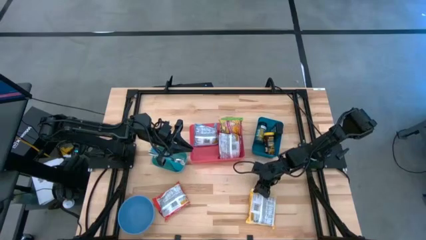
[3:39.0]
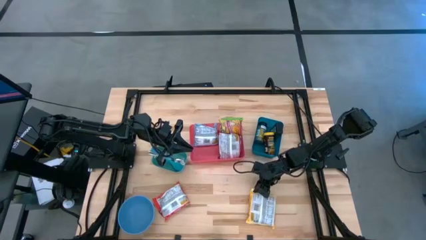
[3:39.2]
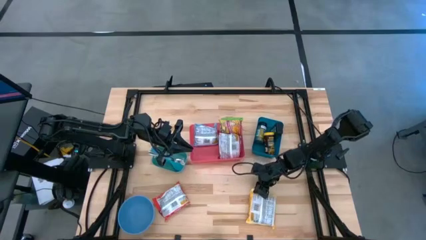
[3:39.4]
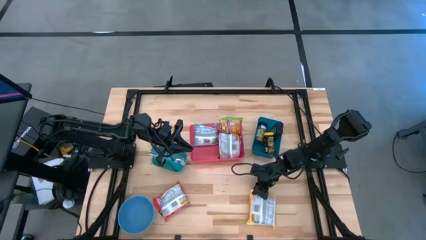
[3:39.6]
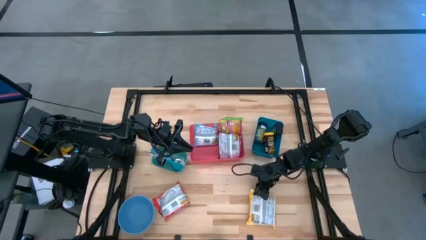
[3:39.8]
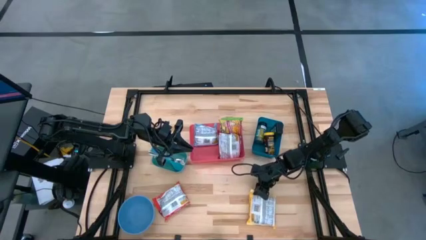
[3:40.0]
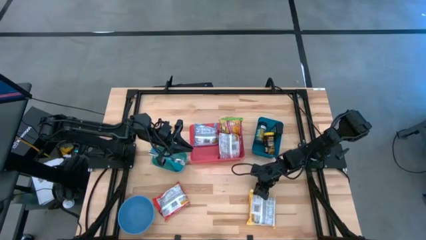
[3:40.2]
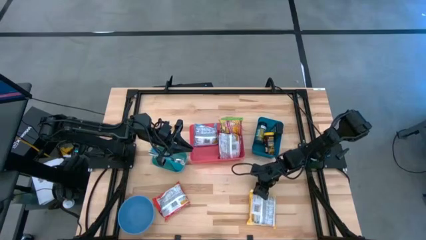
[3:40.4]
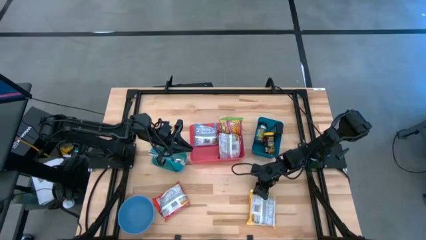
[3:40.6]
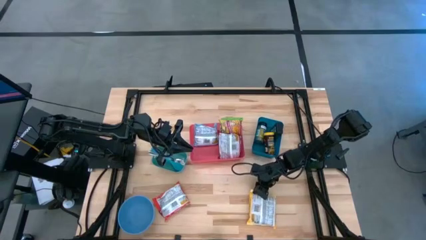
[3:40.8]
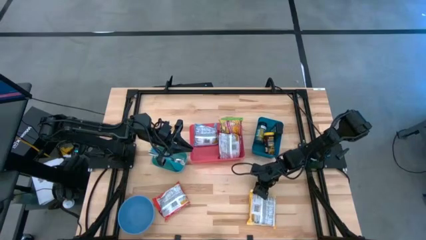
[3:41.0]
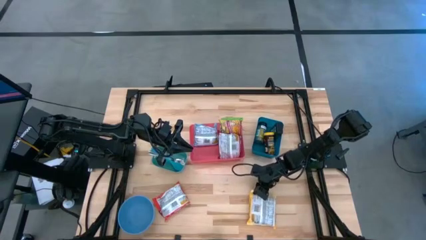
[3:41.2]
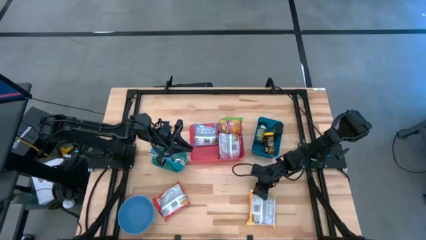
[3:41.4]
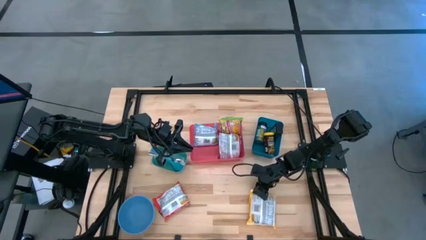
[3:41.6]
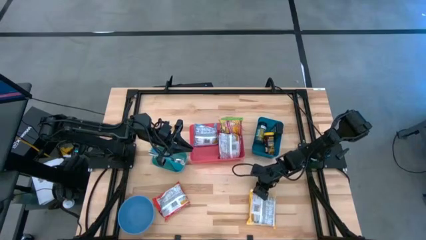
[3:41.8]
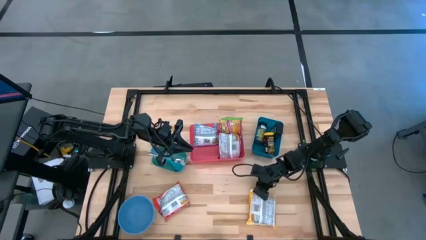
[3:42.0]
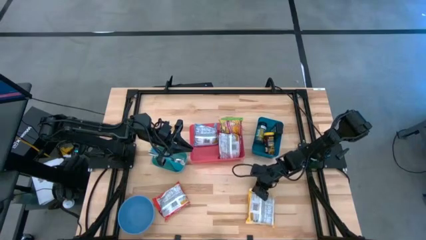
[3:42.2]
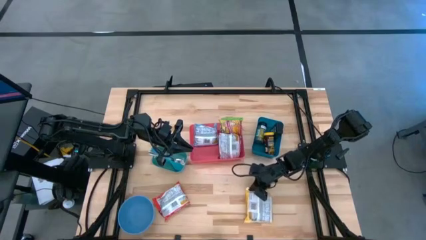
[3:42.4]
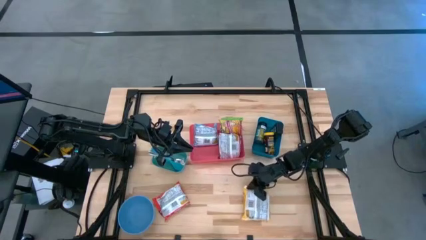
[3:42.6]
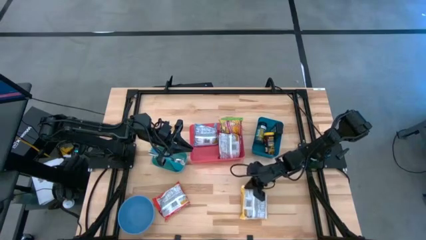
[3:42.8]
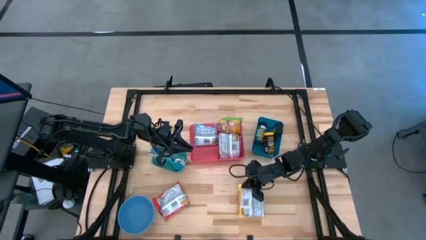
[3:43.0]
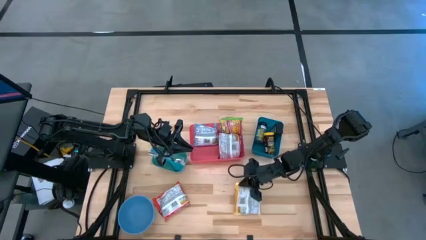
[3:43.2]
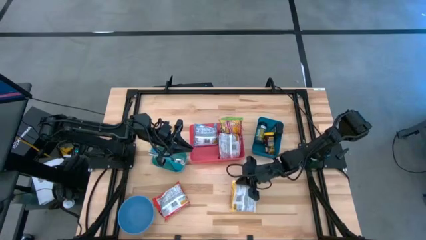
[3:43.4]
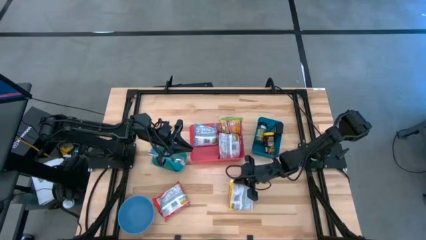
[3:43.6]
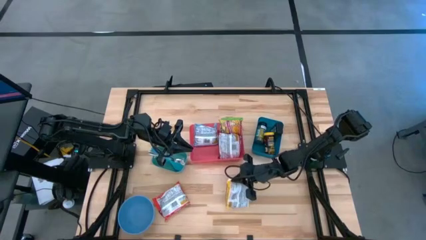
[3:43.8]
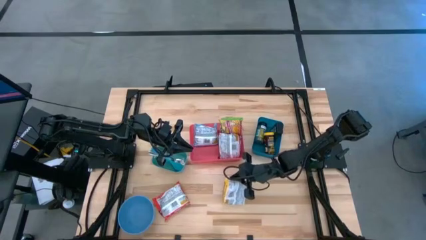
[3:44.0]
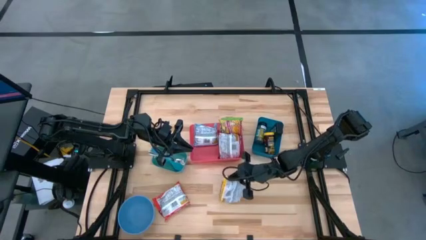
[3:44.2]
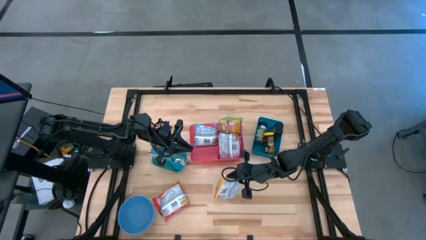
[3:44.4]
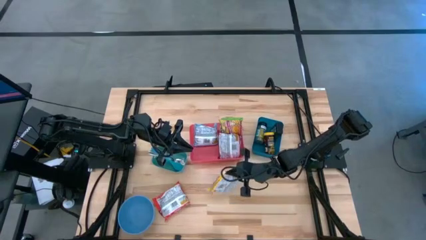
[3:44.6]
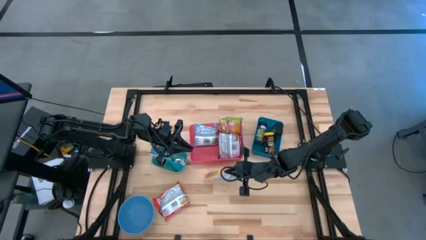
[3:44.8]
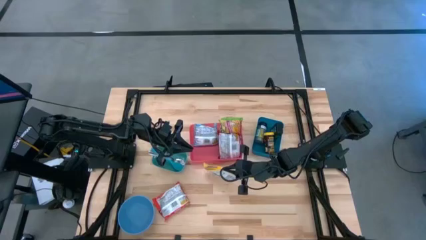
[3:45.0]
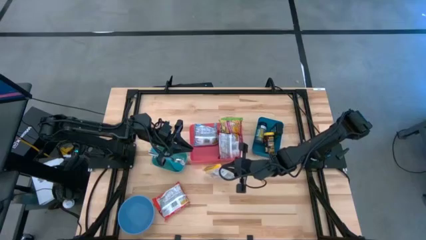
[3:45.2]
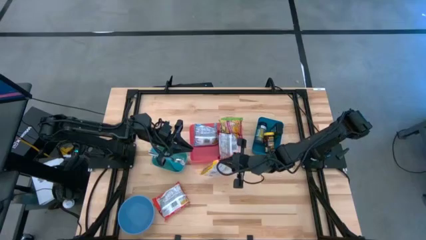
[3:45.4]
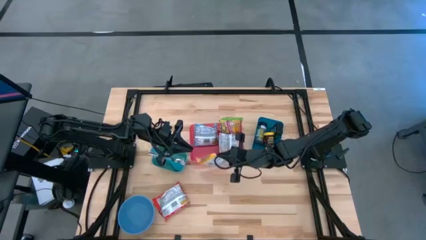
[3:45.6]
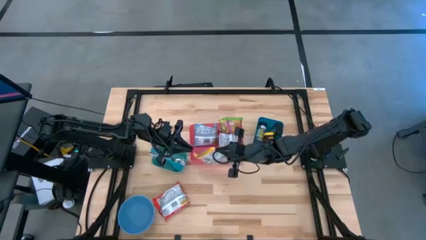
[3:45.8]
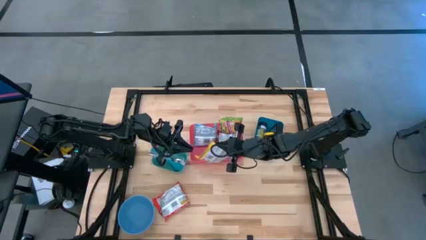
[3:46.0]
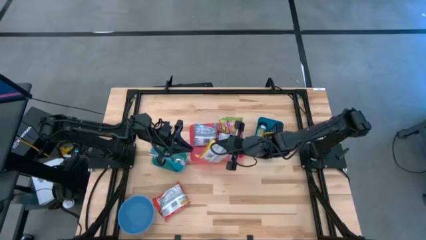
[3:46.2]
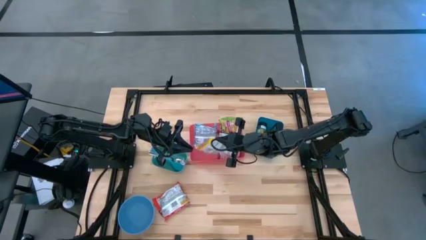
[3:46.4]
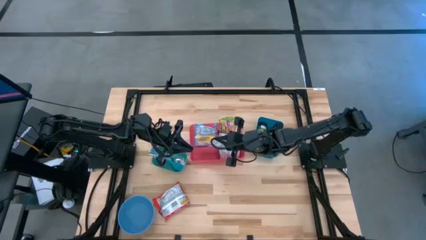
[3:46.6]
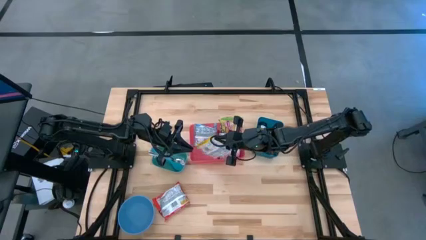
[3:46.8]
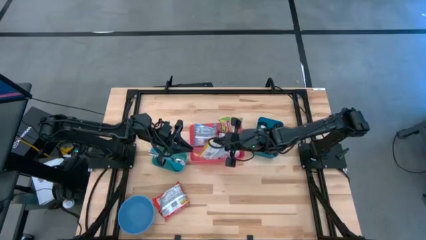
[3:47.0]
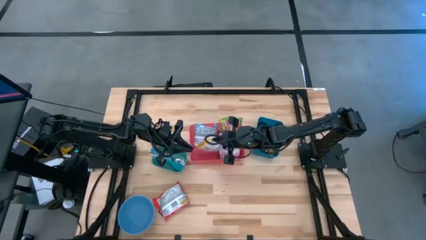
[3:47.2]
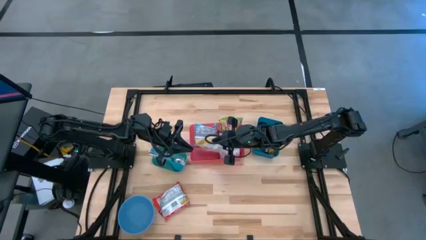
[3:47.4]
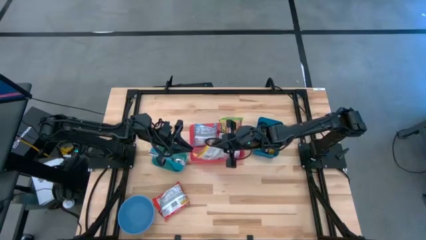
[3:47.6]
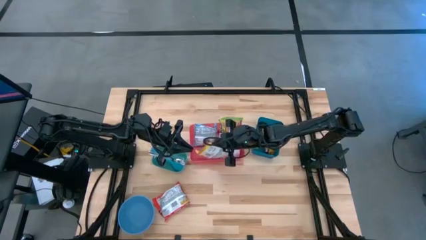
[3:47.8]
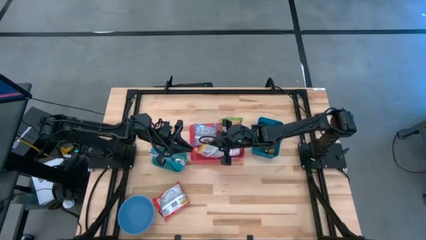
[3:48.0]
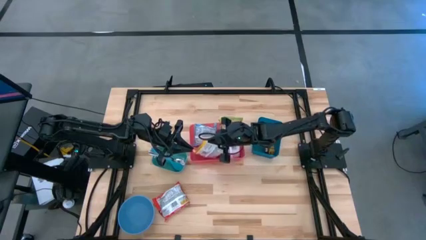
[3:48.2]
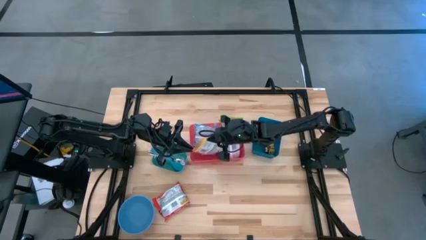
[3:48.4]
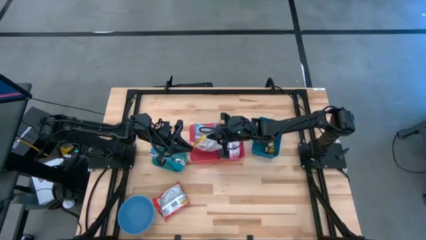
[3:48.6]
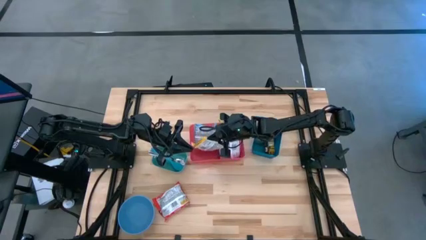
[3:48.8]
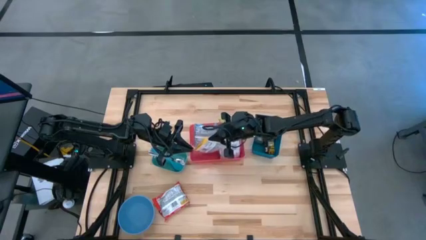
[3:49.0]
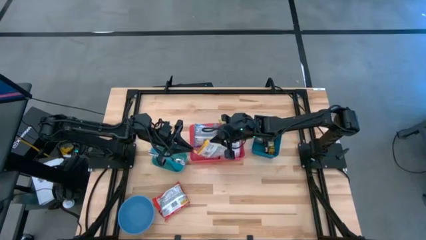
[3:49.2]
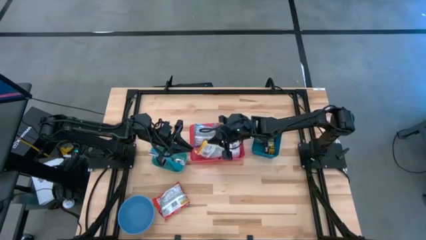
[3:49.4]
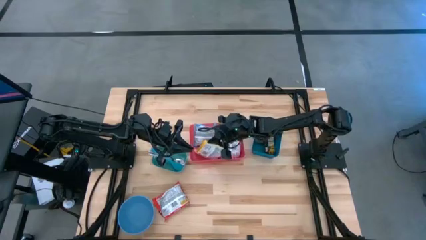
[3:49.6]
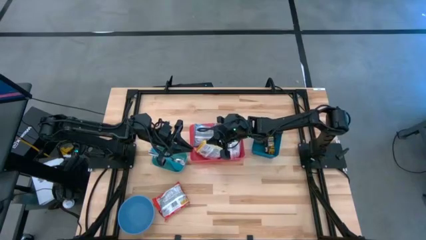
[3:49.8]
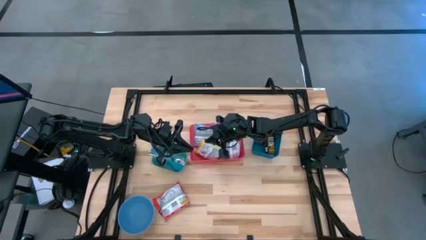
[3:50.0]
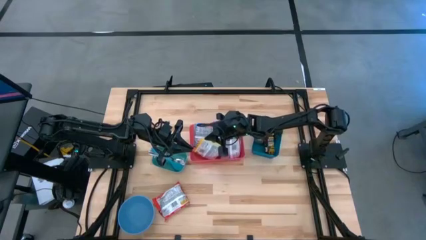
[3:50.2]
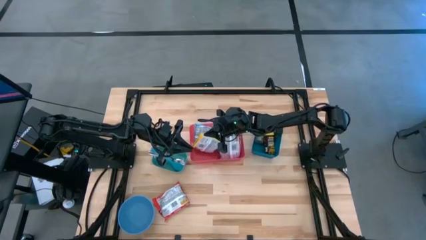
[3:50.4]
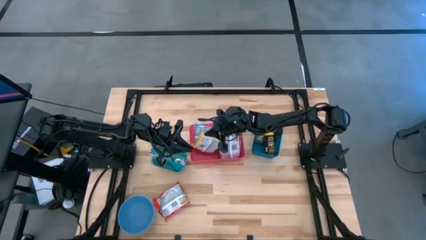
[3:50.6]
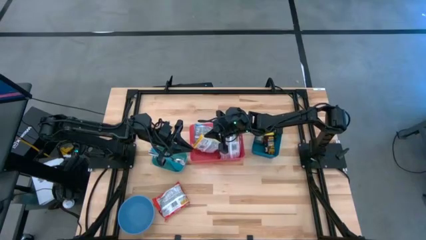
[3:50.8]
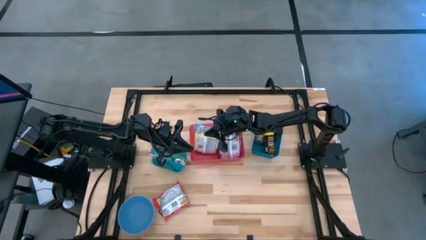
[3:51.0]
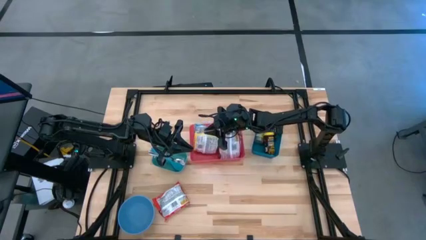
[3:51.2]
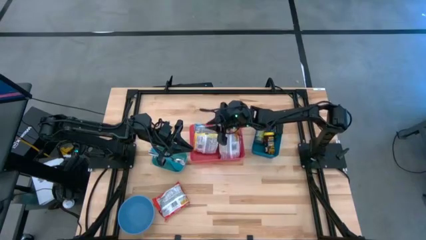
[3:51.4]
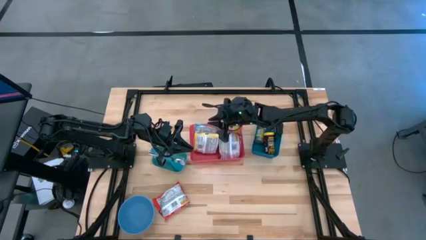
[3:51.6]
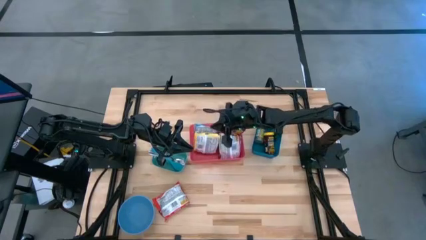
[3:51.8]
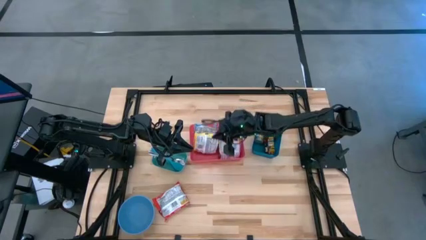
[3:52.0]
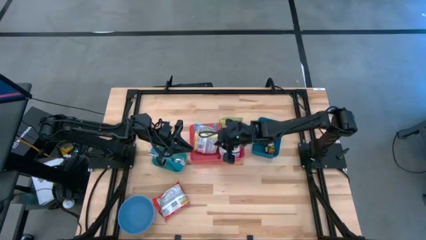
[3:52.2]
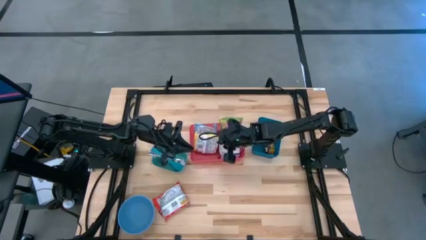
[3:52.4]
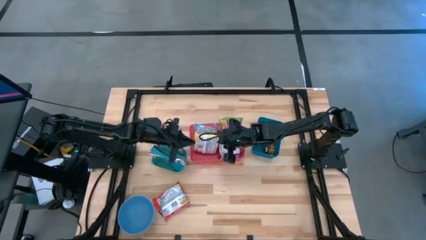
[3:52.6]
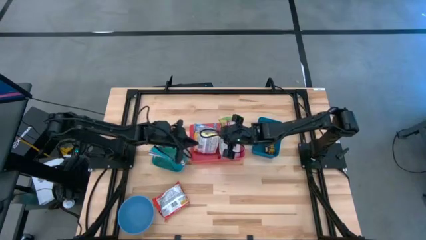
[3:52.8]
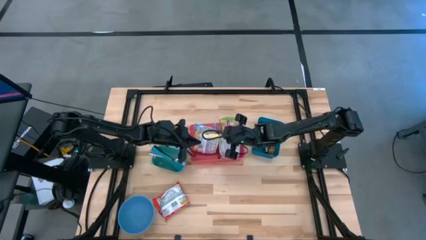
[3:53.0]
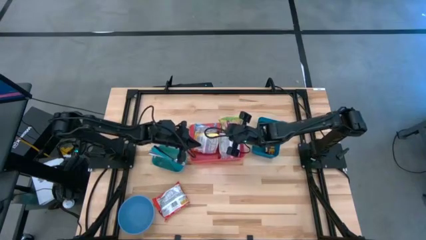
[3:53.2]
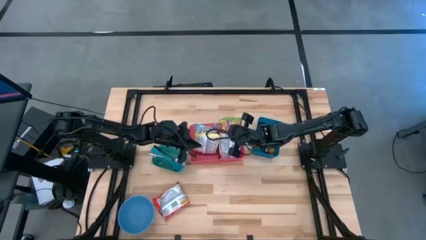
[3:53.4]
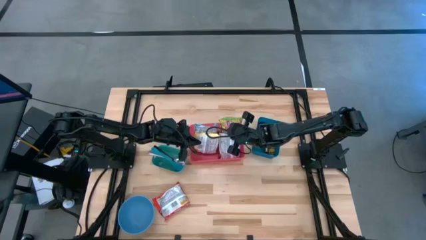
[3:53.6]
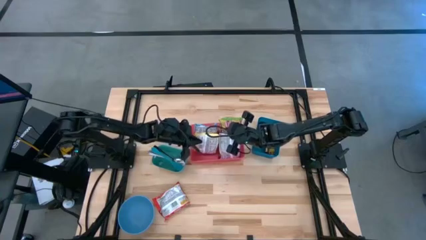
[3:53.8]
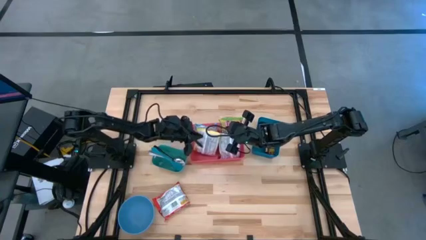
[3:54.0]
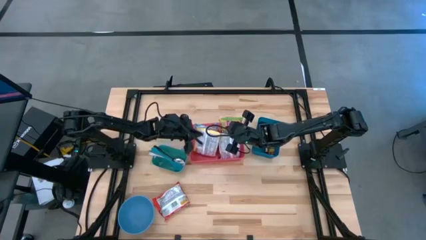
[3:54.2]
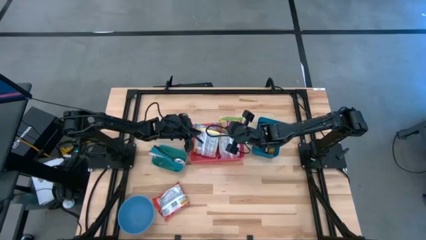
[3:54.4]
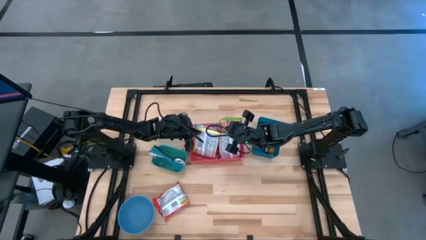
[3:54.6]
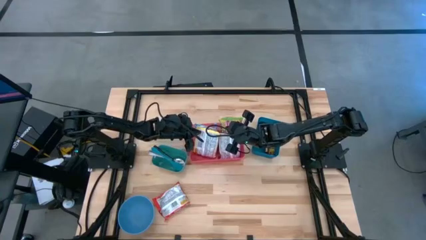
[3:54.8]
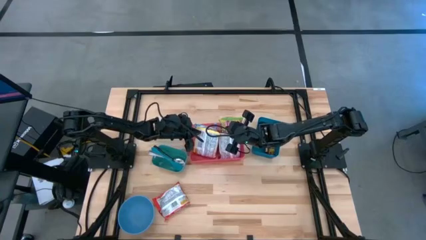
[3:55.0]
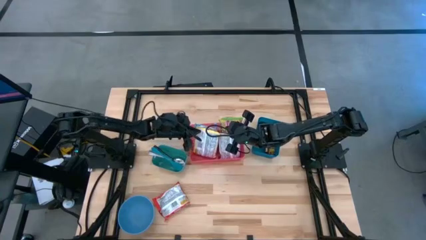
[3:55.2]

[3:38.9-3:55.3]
Task: Pick & Place Food Item
Put the yellow noodle pack into the red bin
